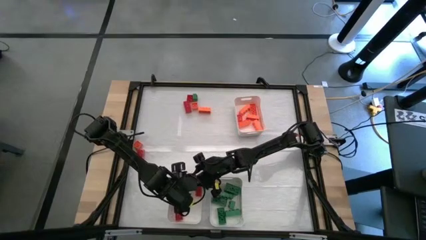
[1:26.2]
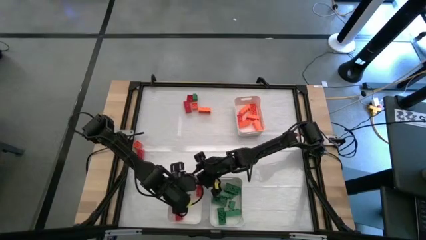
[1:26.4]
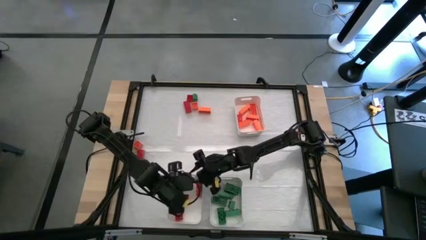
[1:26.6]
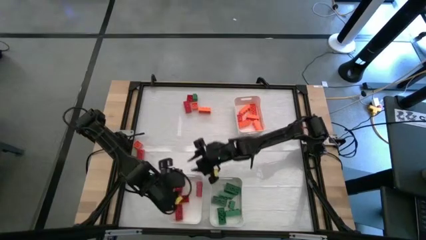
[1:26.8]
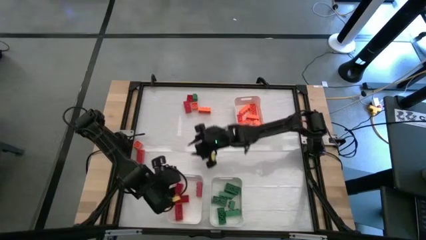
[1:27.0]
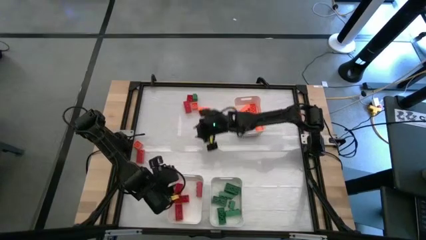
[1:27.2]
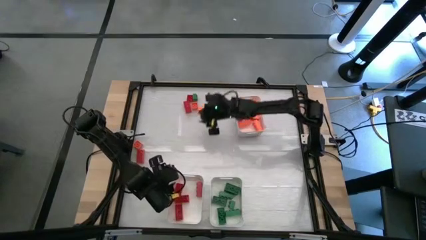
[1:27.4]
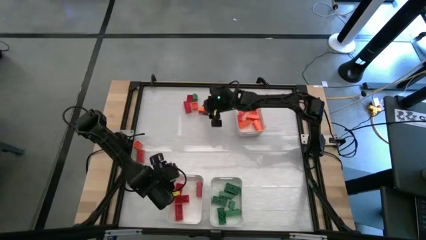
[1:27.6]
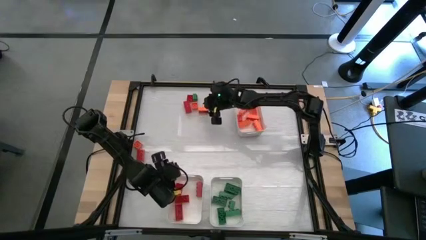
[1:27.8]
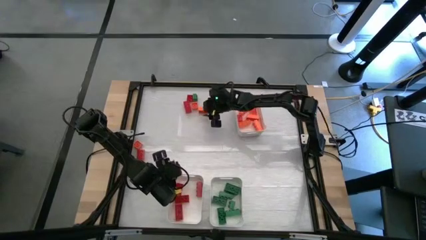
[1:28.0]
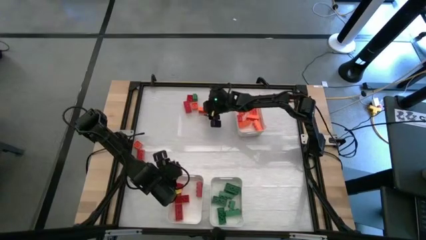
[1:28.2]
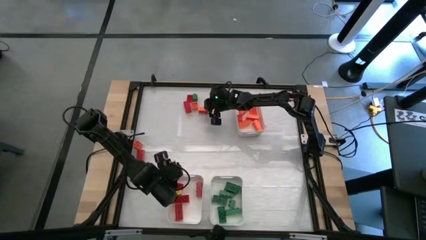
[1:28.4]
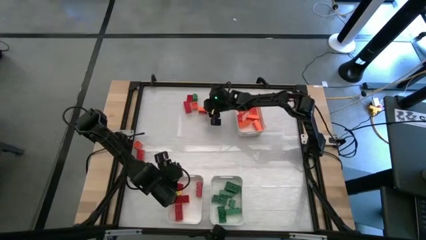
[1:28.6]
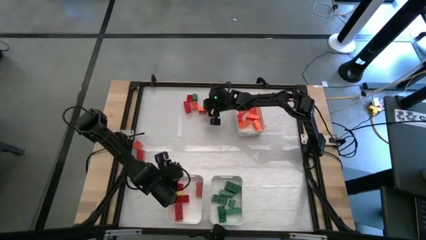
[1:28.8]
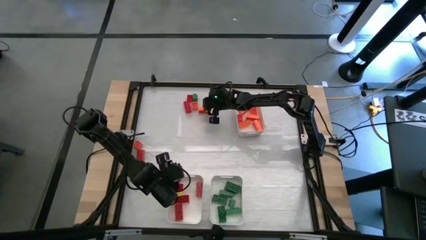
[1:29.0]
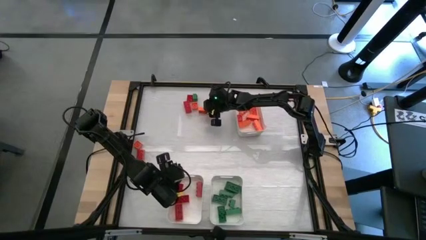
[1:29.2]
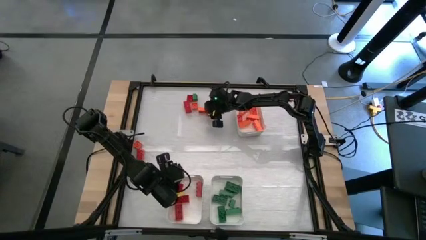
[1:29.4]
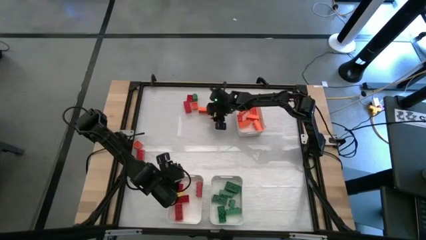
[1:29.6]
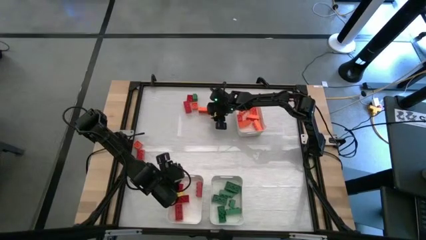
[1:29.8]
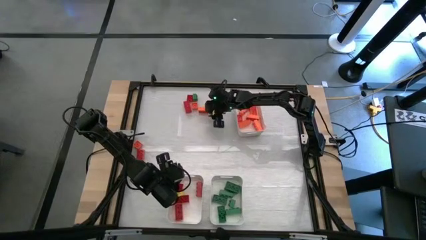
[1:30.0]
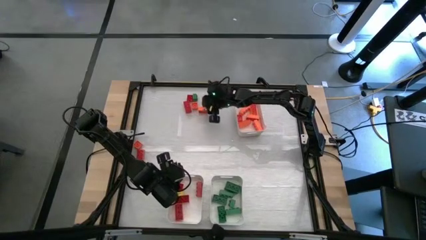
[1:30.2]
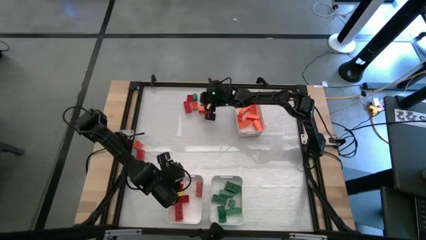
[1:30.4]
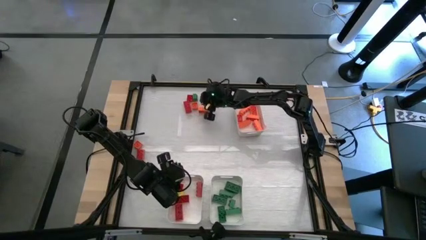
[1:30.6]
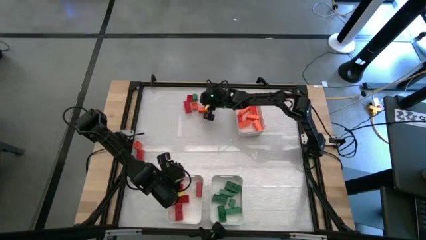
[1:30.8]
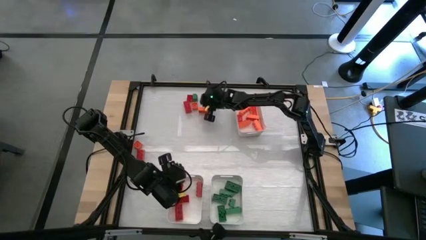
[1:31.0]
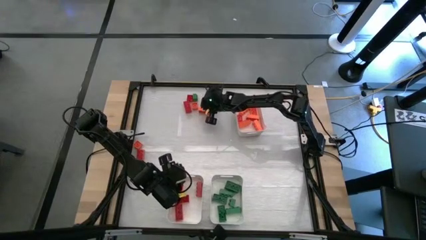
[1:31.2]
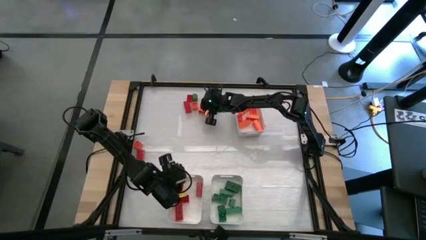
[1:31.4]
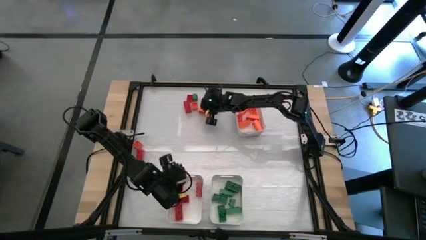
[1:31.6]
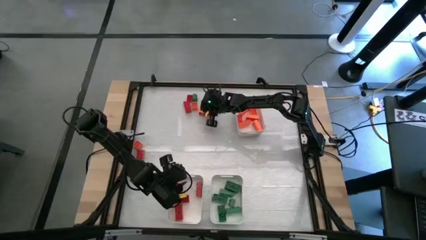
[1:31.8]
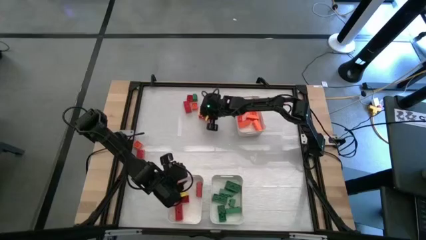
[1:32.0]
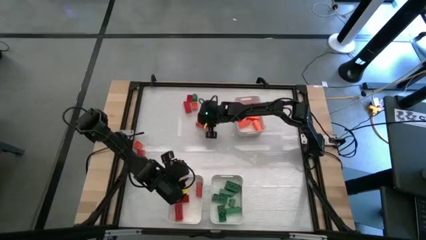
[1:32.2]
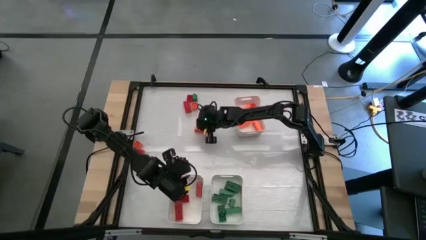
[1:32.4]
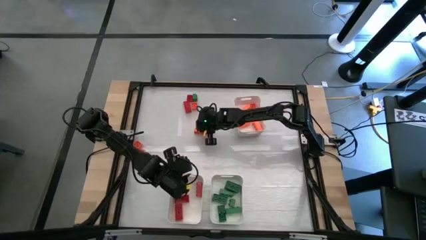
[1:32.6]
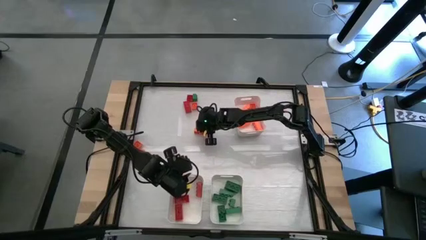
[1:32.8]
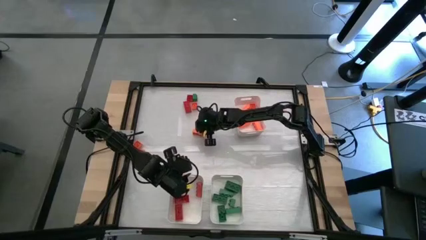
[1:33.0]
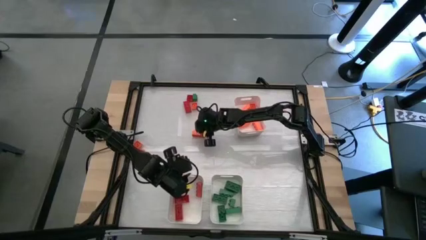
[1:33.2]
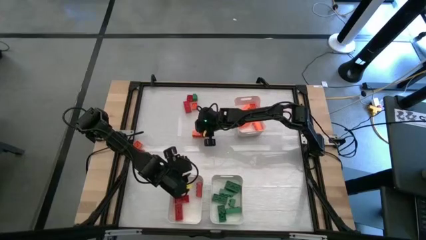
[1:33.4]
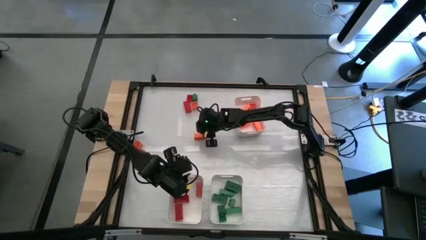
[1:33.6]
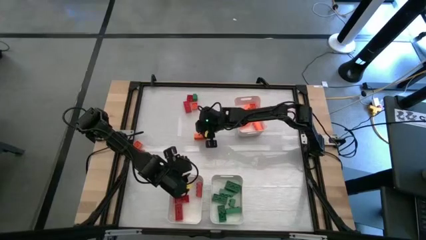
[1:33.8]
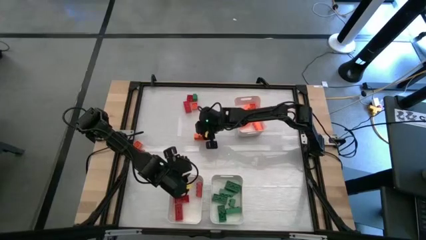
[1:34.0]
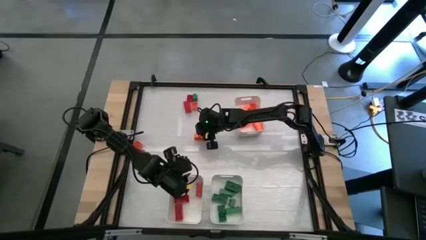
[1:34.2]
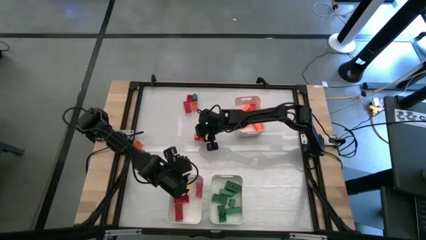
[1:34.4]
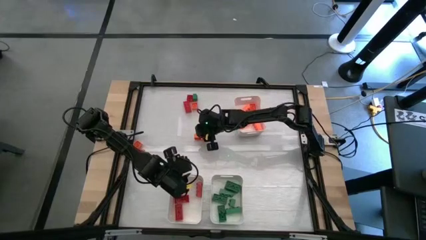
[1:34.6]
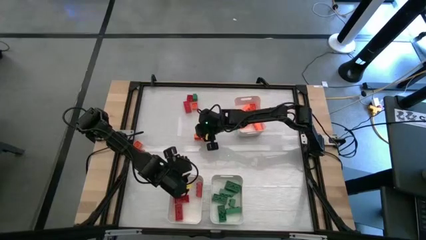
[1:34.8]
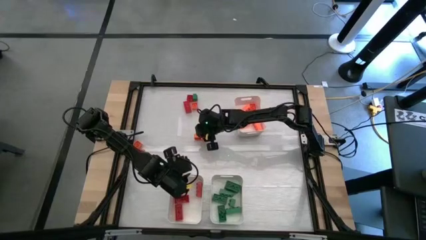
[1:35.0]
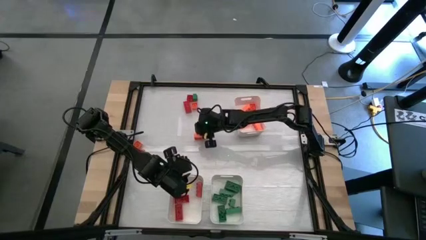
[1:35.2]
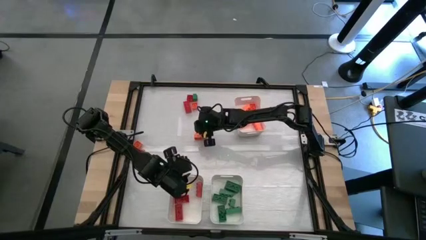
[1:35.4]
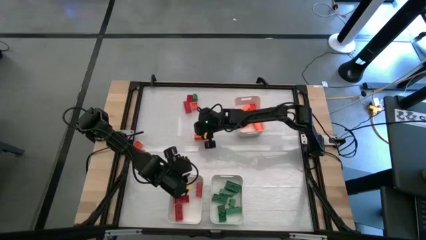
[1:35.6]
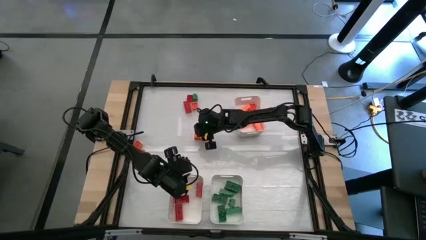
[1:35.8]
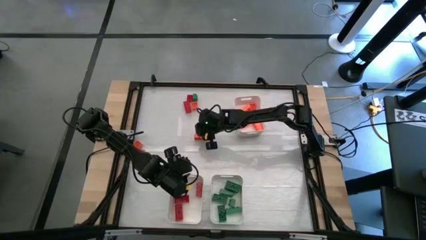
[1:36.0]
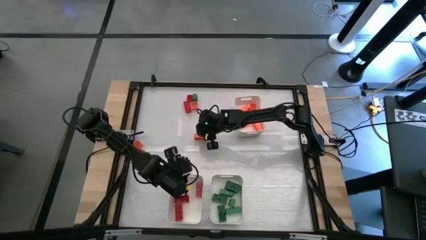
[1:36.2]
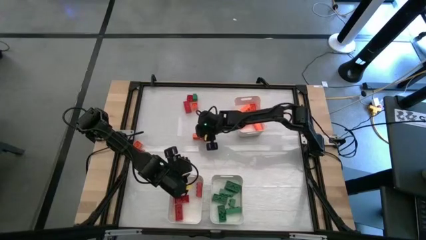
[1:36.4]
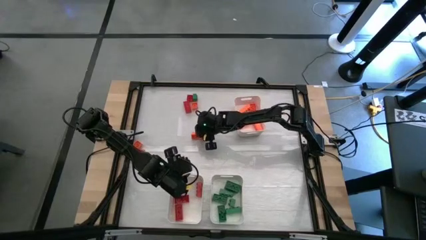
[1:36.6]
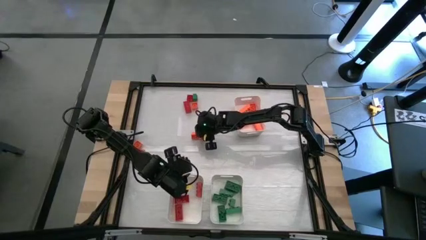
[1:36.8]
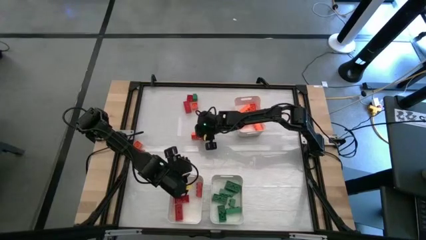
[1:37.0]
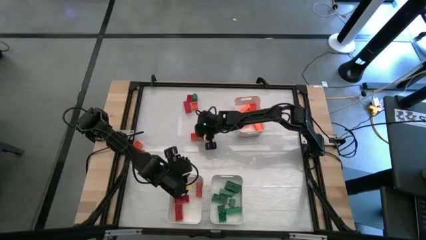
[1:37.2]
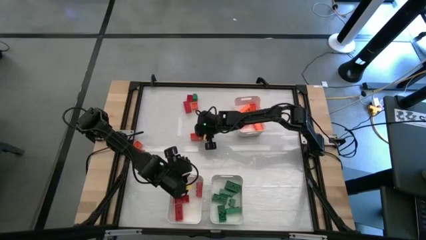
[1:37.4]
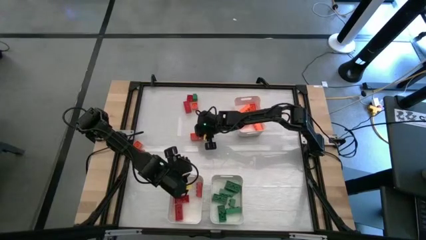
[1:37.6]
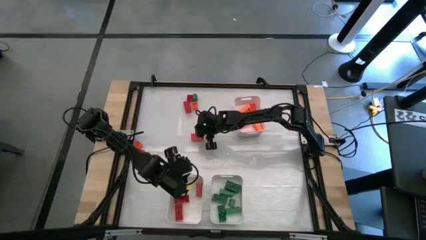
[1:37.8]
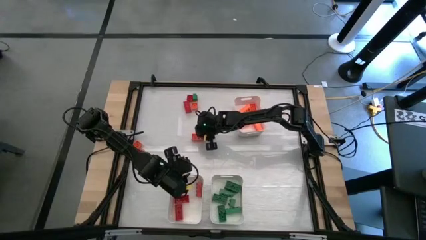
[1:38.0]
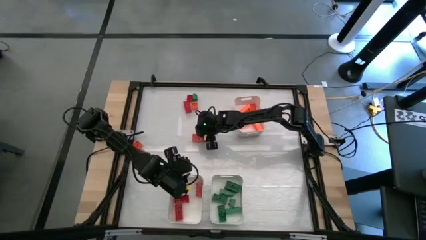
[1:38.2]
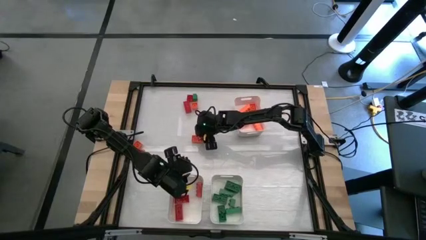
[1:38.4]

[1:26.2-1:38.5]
Task: Sort blocks
Put the orange game piece into the top right white bin

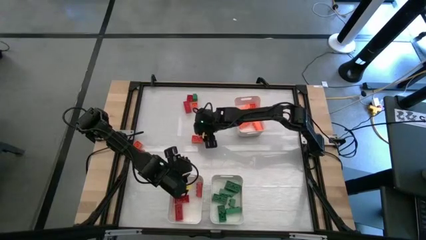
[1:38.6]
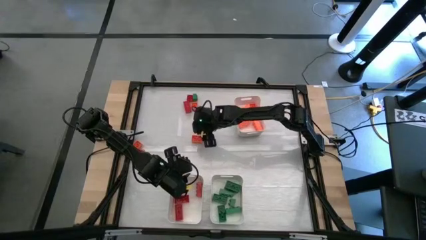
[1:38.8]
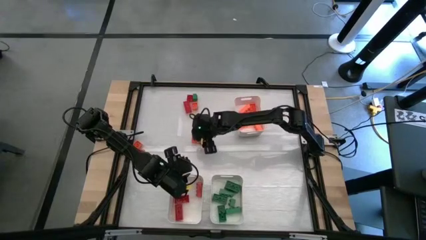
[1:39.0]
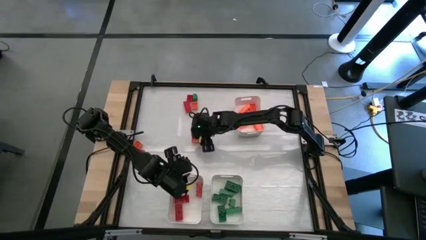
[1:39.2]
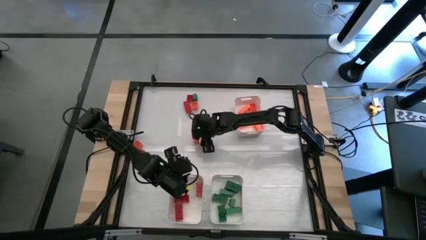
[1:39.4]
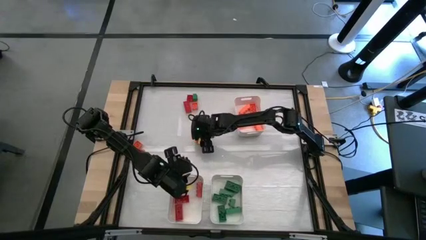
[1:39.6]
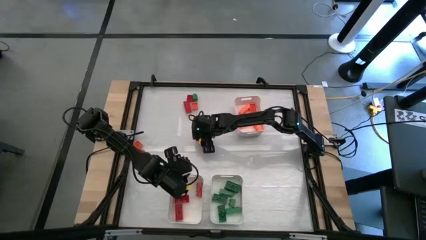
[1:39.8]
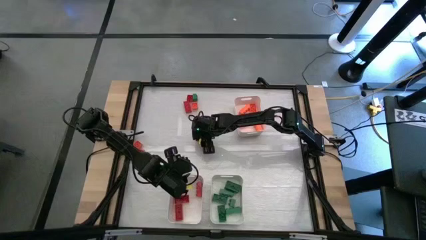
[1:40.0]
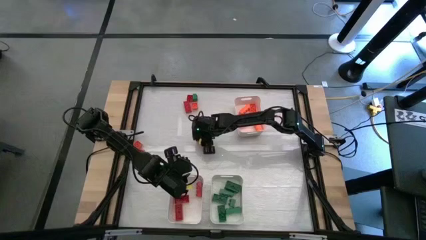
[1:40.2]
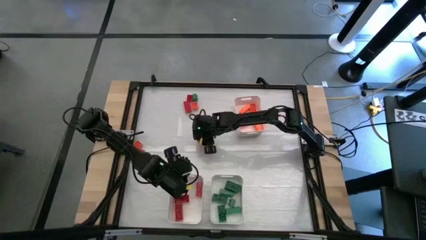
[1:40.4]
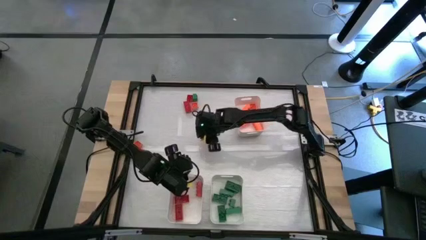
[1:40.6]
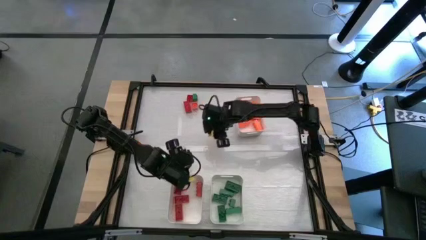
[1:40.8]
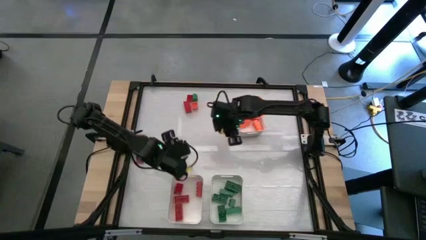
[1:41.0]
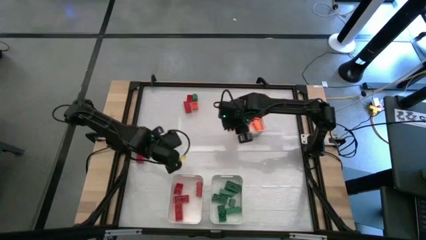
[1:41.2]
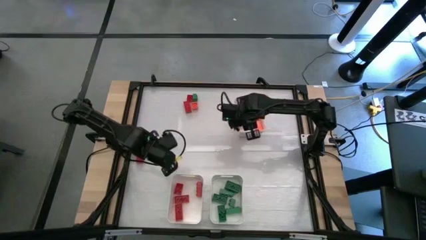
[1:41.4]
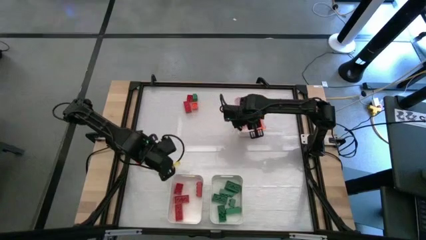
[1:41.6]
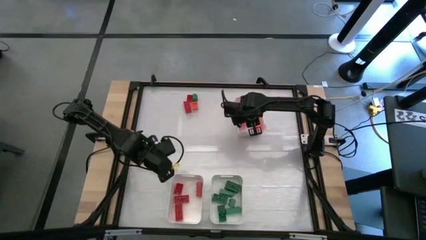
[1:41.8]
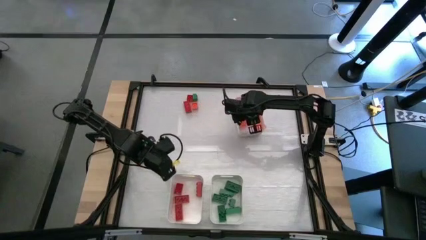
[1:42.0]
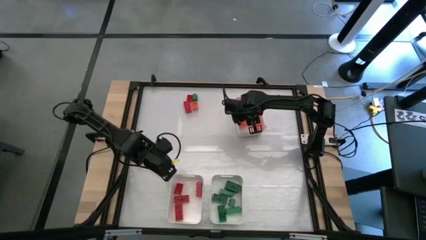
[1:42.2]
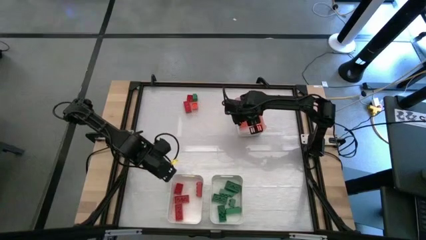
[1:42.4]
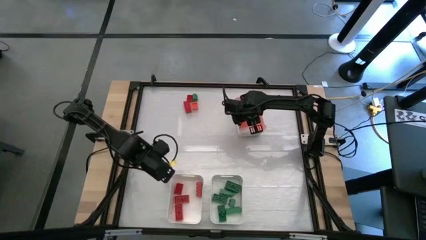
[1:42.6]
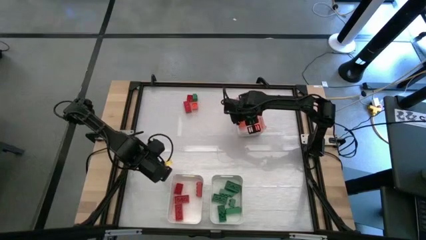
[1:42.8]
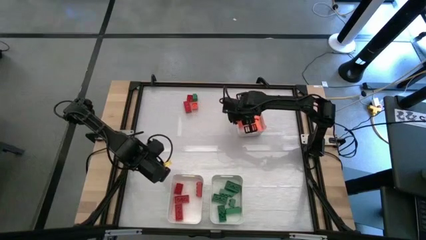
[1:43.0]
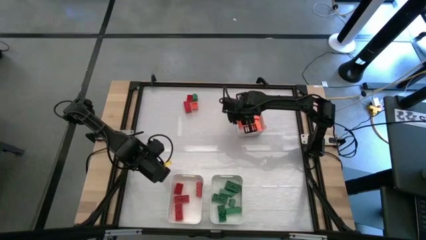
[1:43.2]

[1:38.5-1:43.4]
Put the orange game piece into the top right white bin
